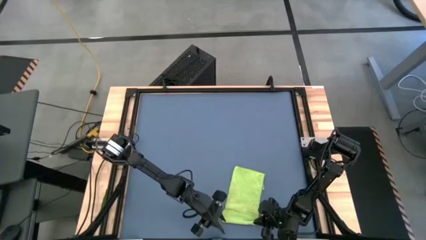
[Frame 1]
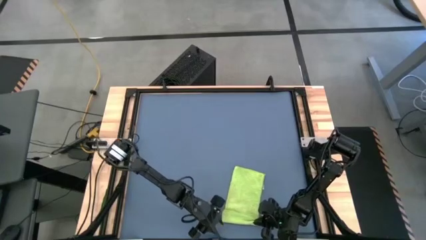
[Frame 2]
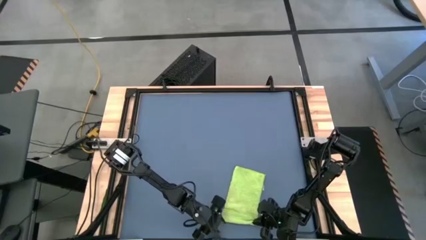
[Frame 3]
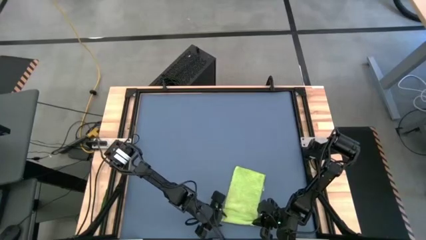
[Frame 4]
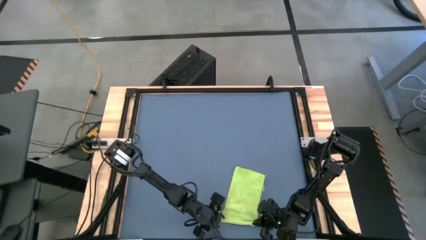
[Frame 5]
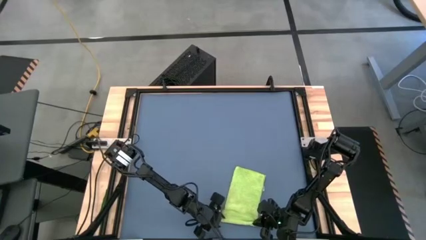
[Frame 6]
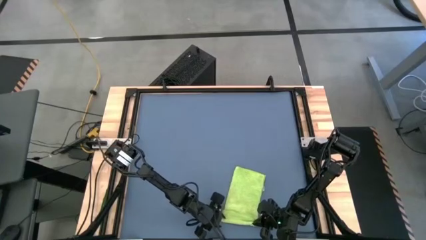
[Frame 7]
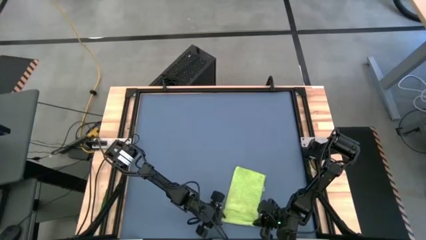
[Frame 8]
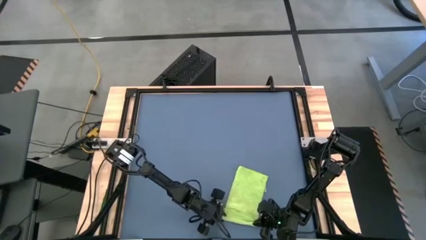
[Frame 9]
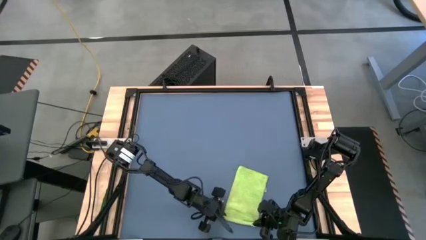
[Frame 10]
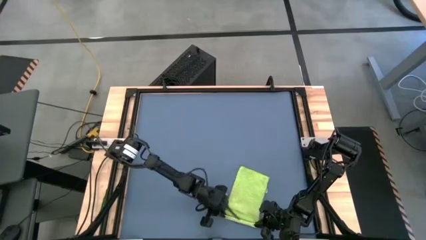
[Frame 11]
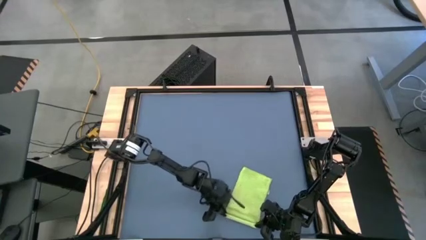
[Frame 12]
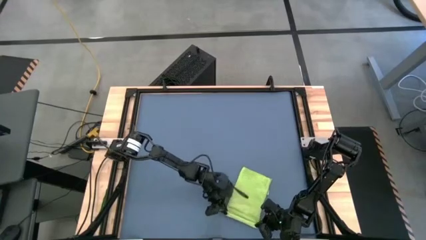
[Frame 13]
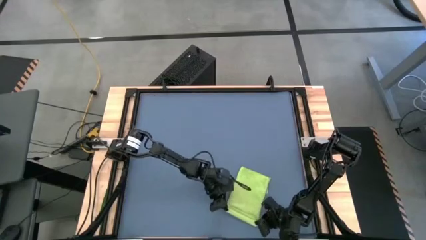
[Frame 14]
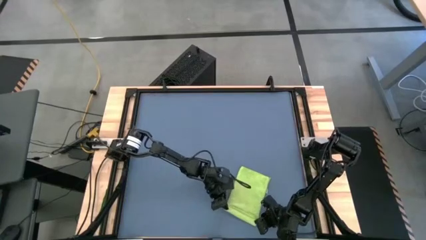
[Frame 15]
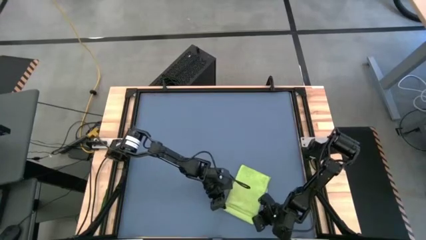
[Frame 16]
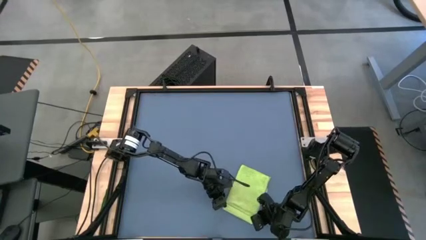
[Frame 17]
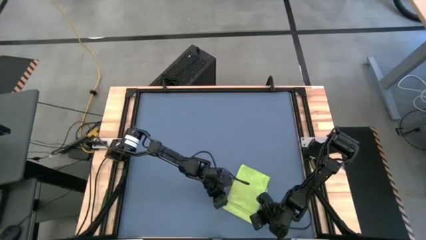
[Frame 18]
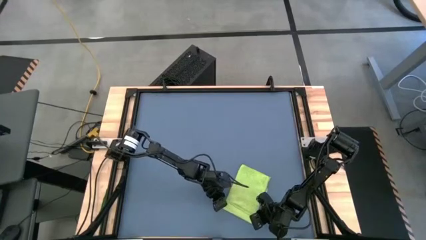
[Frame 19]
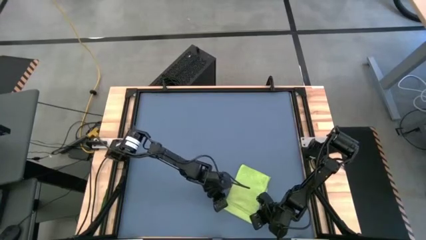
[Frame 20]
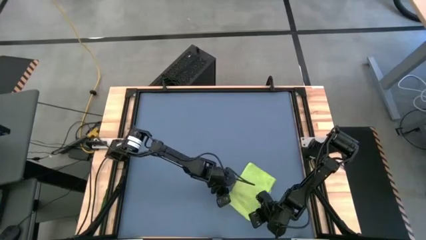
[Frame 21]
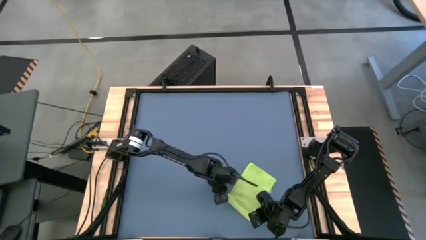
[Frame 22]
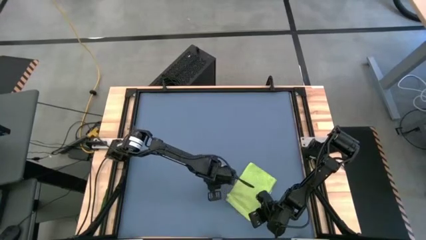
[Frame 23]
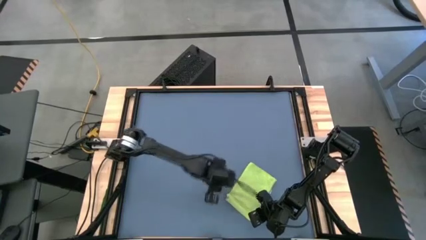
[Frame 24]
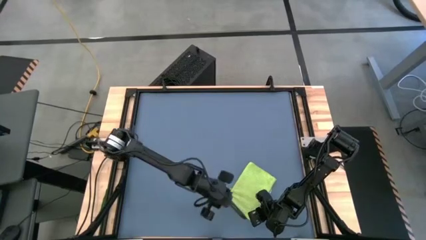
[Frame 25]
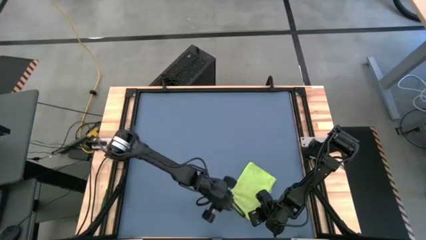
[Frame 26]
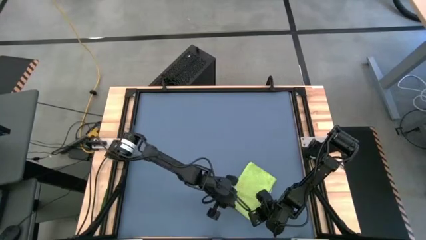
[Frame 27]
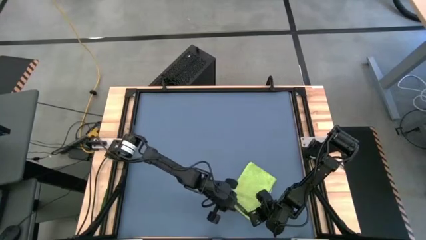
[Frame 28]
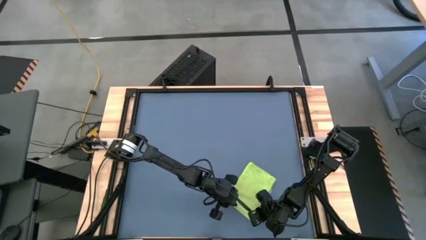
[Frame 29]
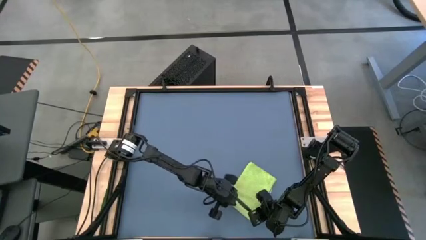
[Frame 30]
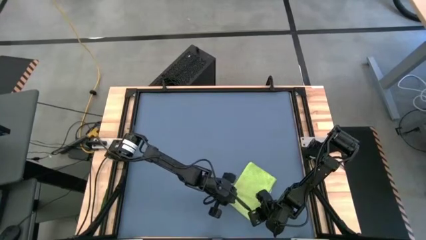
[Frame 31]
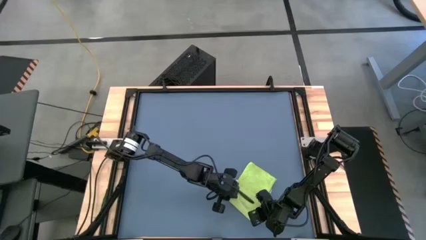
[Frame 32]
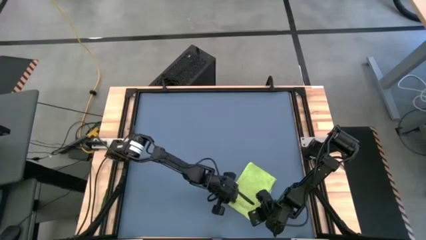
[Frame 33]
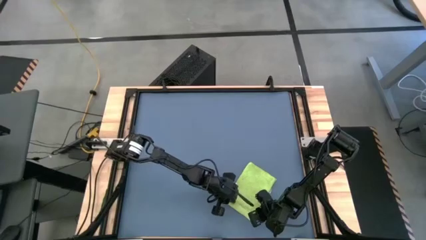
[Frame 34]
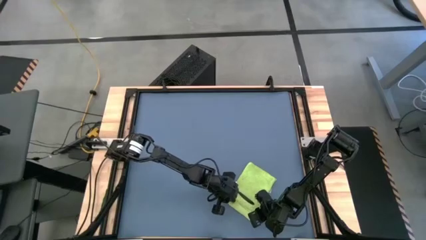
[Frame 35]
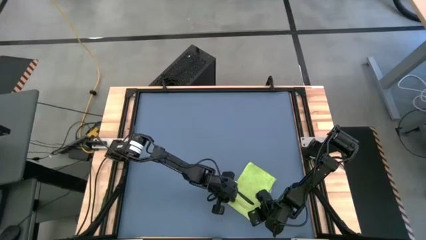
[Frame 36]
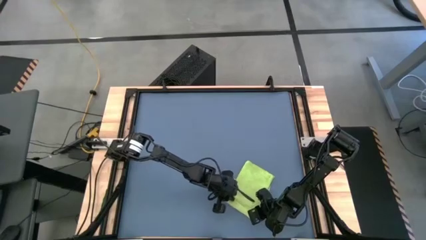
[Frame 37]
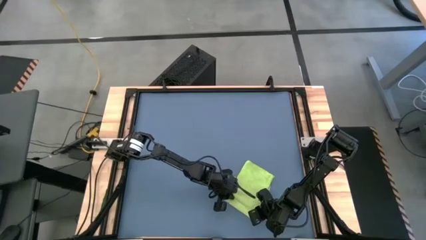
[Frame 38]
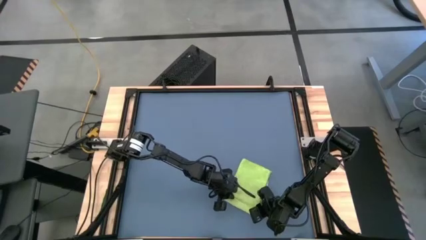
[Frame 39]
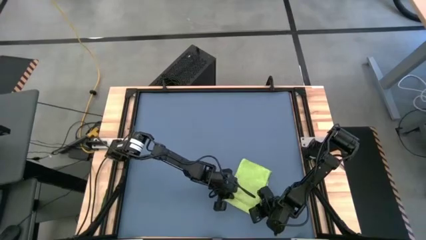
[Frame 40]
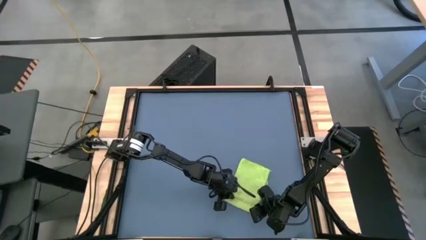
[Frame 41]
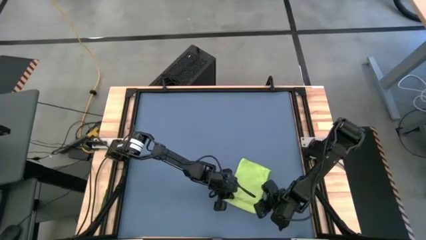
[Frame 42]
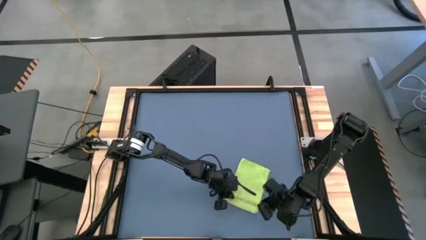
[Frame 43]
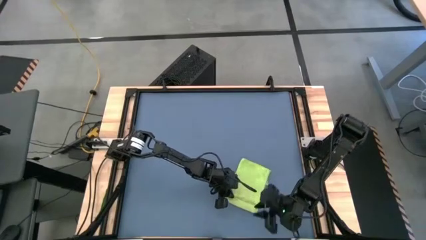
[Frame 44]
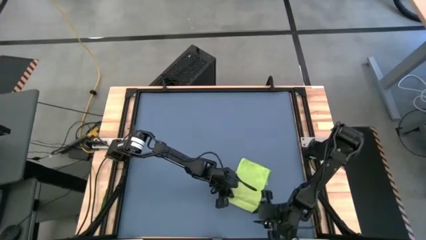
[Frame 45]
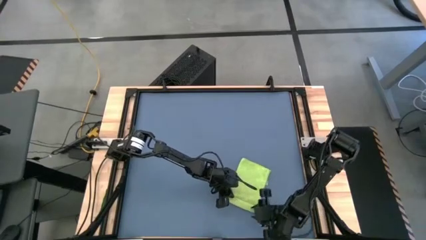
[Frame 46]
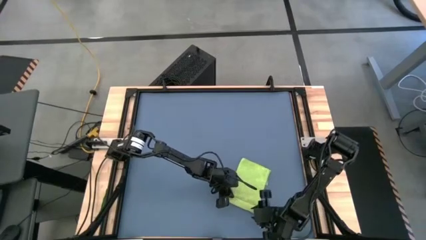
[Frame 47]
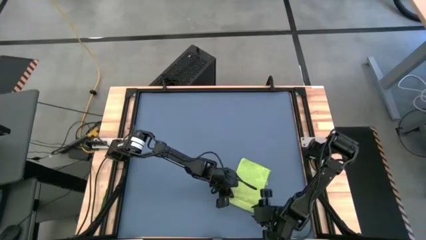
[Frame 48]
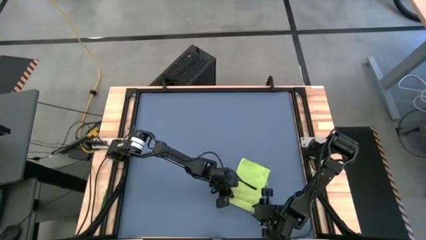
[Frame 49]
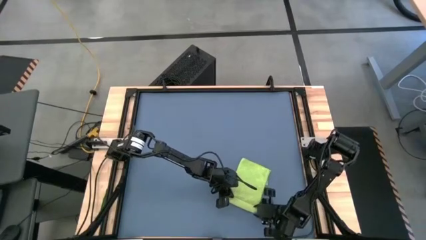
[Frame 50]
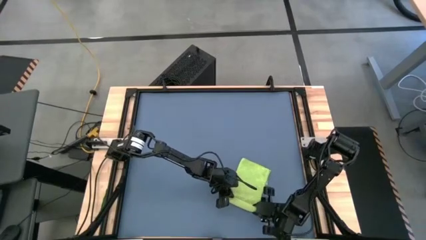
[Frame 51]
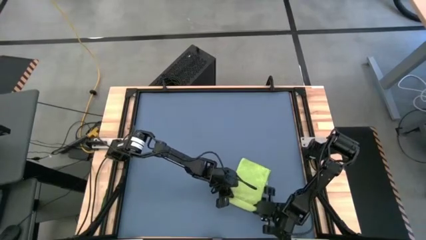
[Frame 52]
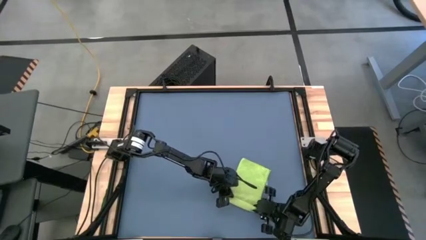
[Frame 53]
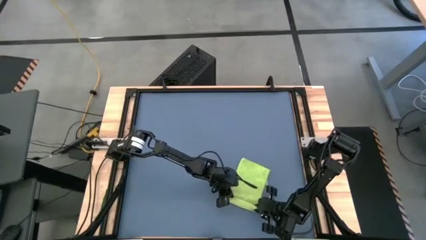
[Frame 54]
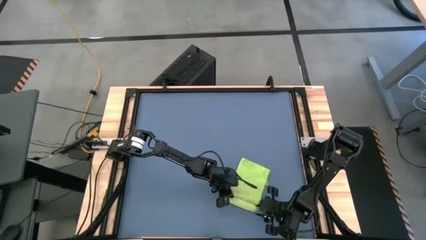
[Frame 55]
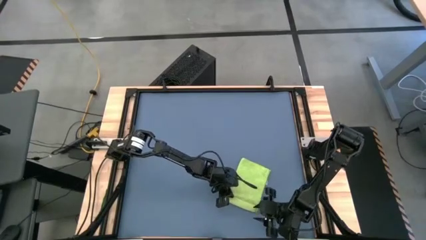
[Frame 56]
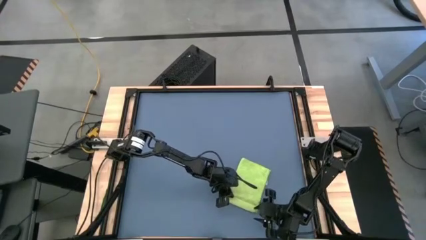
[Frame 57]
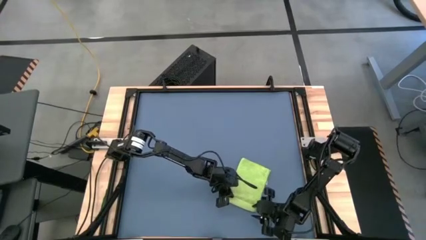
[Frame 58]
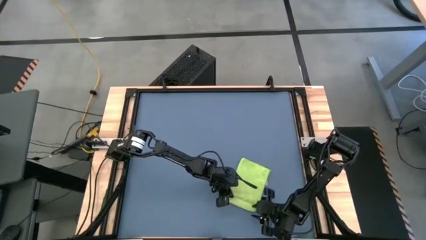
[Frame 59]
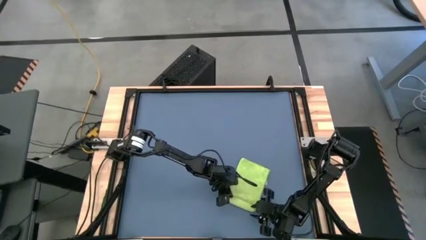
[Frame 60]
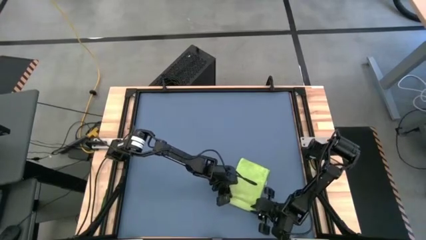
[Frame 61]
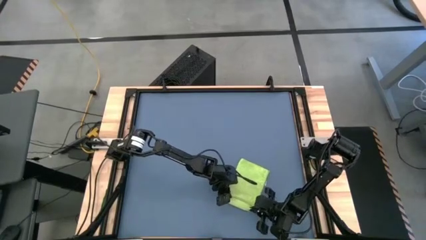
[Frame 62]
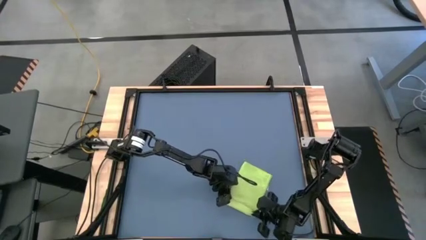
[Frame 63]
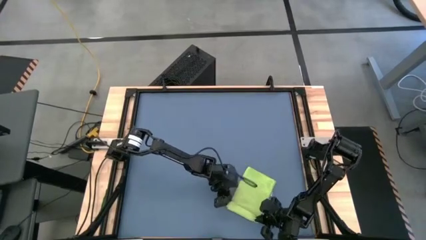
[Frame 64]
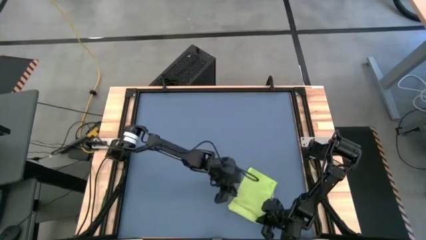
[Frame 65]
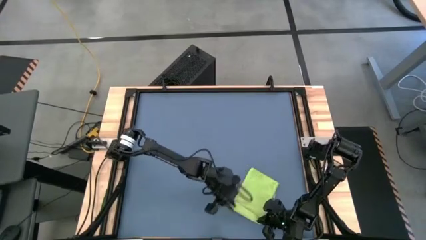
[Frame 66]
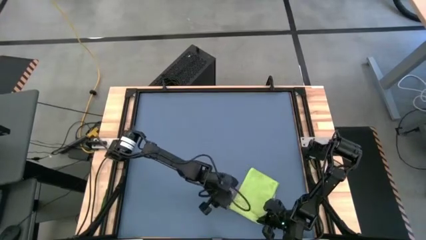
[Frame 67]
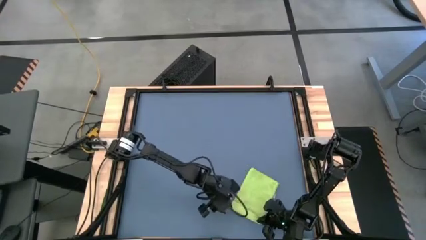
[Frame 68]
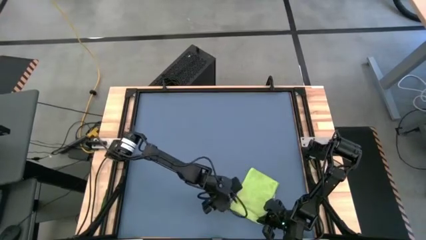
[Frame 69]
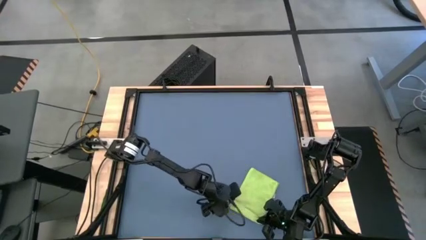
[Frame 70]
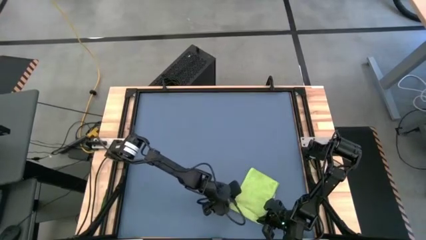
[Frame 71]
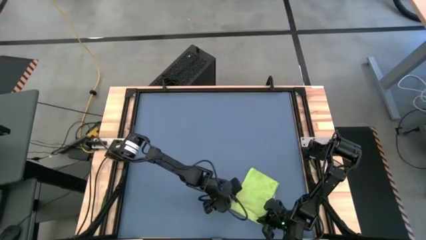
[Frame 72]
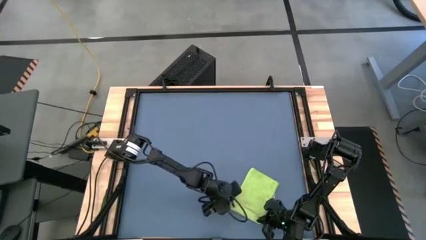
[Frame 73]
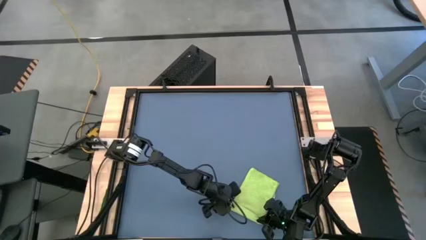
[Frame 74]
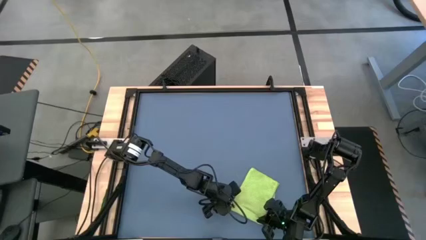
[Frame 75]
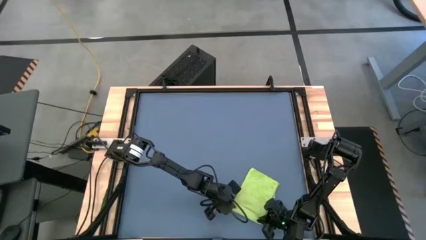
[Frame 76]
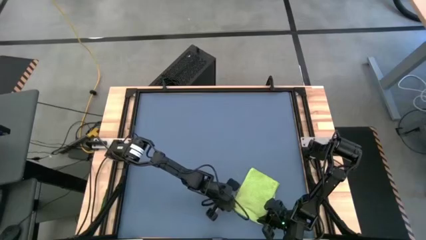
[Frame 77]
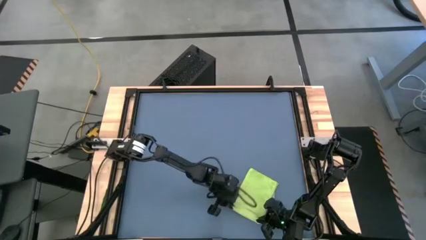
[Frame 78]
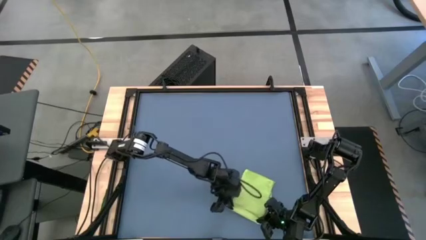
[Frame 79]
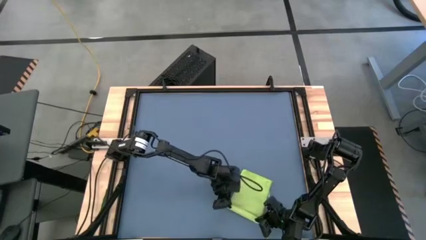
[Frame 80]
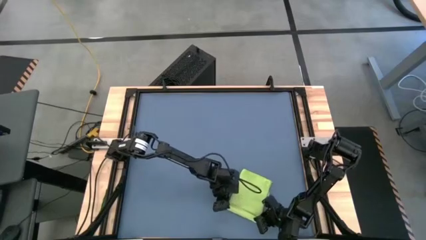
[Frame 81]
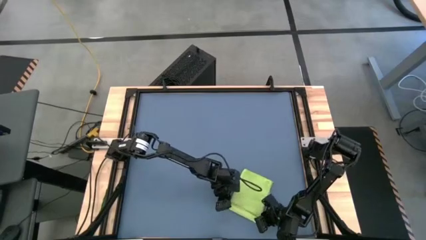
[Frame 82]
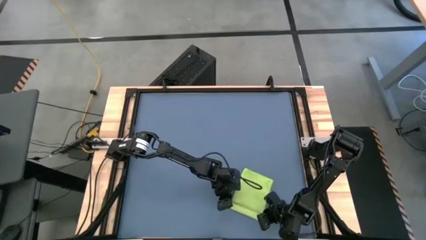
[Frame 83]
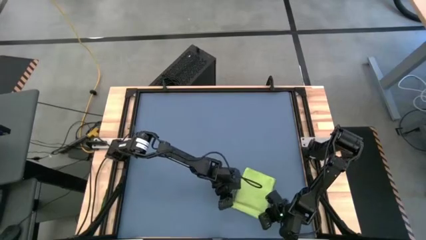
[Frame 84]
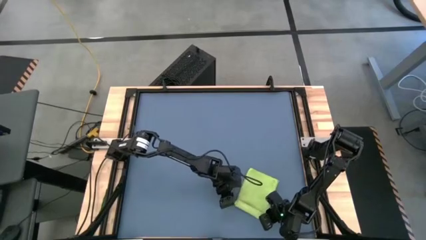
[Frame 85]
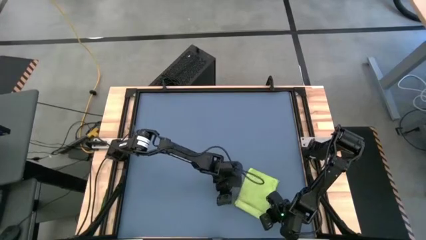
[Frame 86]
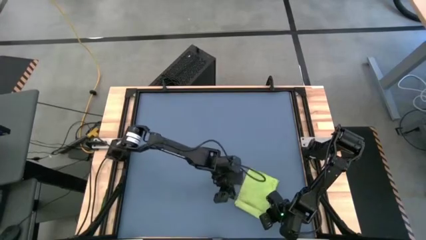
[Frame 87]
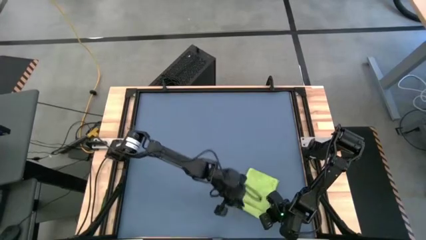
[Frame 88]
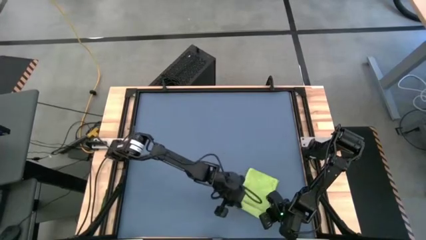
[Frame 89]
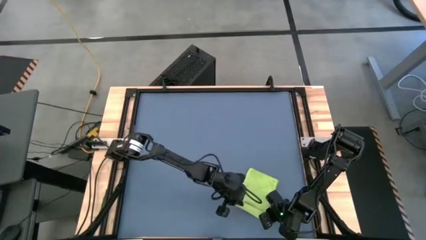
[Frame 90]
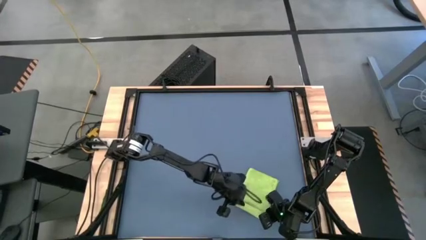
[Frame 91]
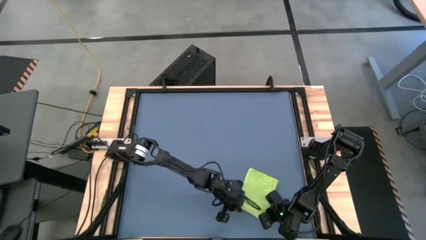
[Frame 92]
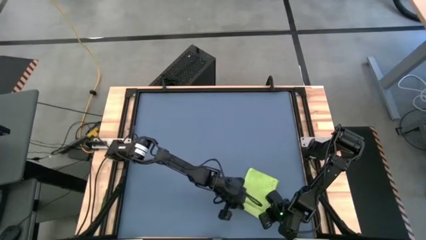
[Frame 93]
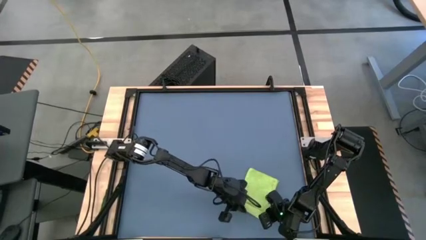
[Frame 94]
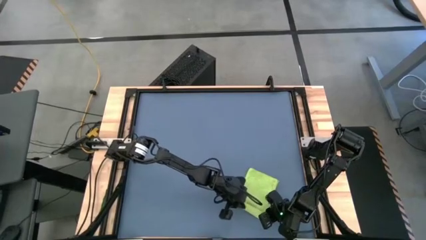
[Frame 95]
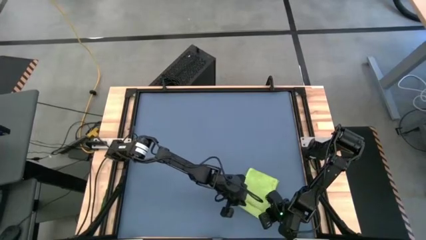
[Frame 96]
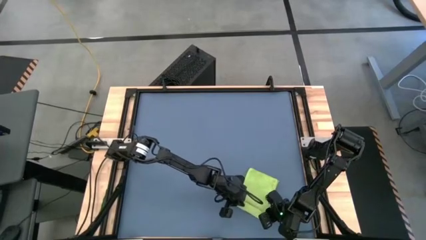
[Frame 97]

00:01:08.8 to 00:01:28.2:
Task: Roll towel
Roll the green towel
